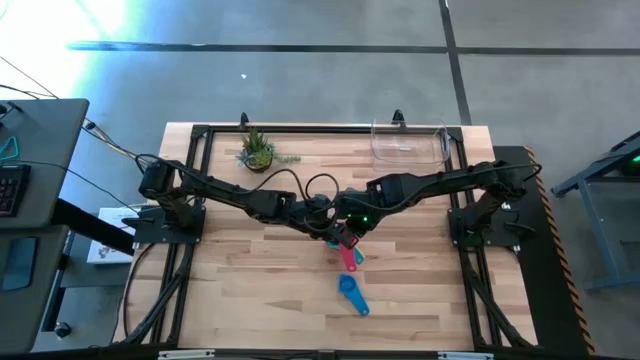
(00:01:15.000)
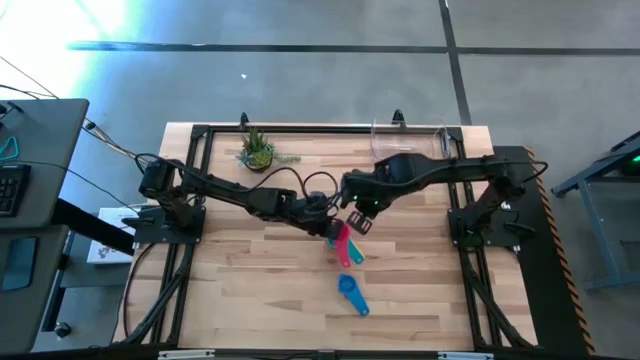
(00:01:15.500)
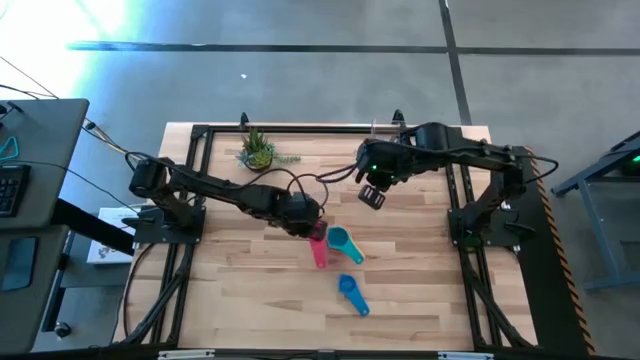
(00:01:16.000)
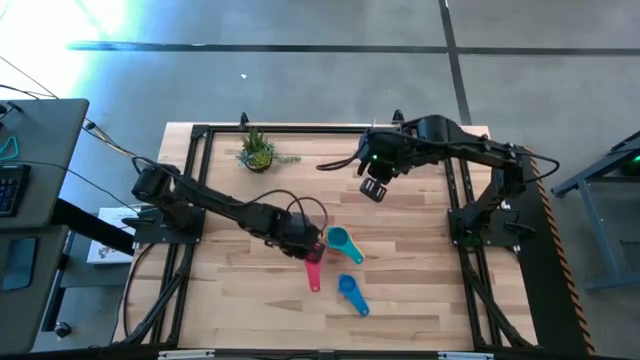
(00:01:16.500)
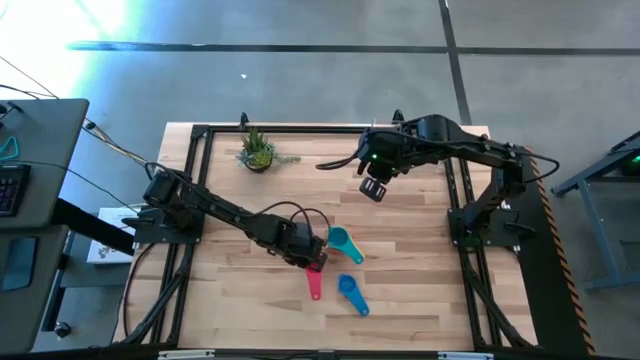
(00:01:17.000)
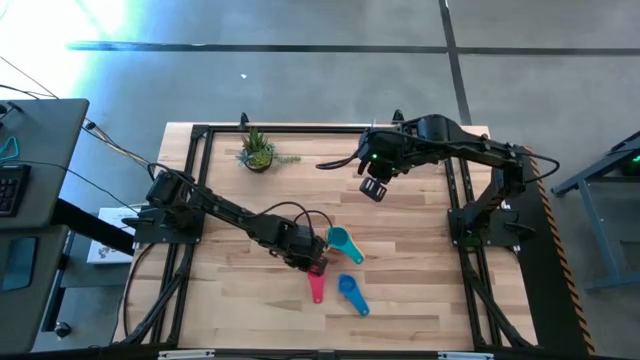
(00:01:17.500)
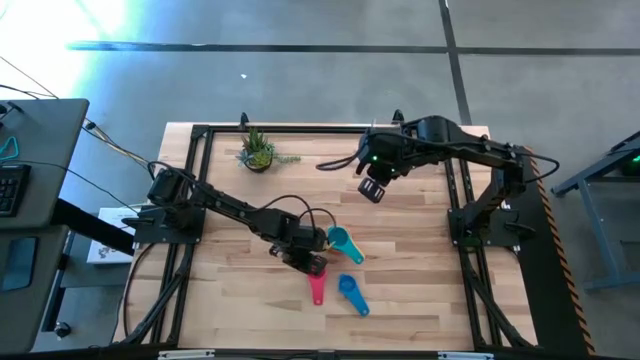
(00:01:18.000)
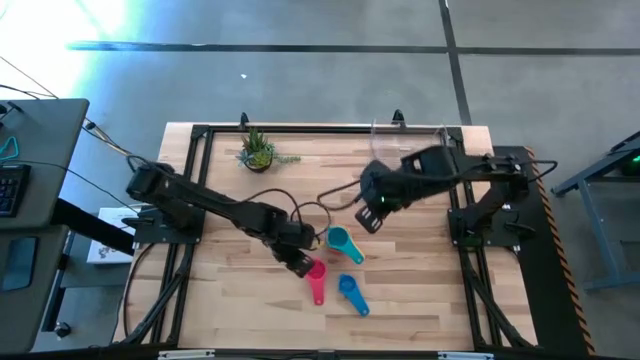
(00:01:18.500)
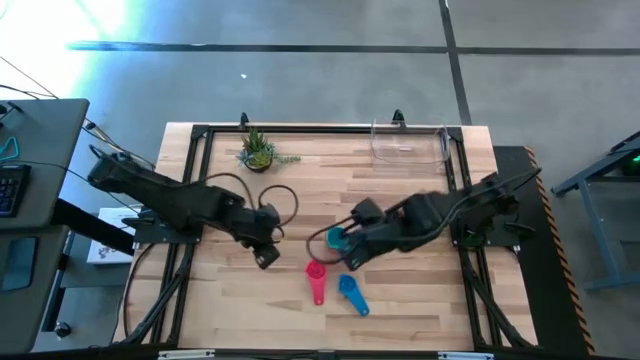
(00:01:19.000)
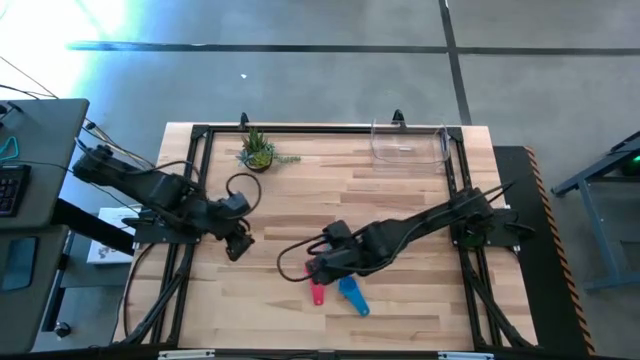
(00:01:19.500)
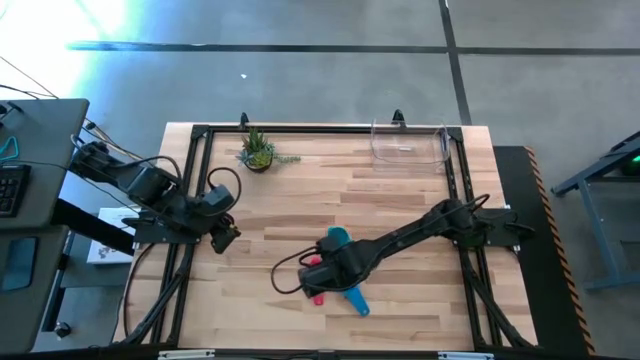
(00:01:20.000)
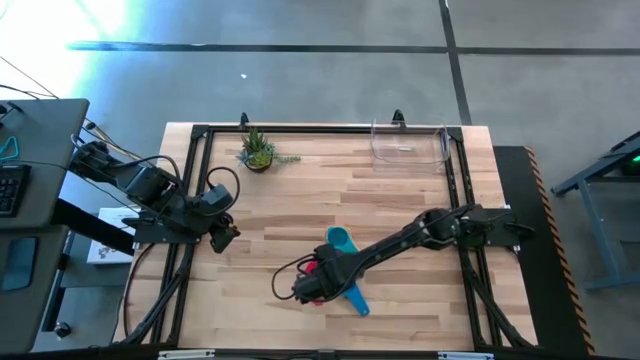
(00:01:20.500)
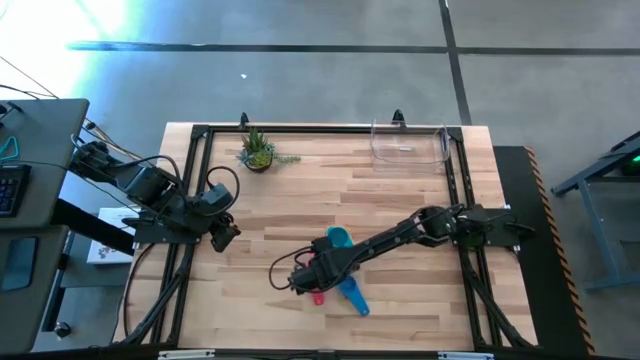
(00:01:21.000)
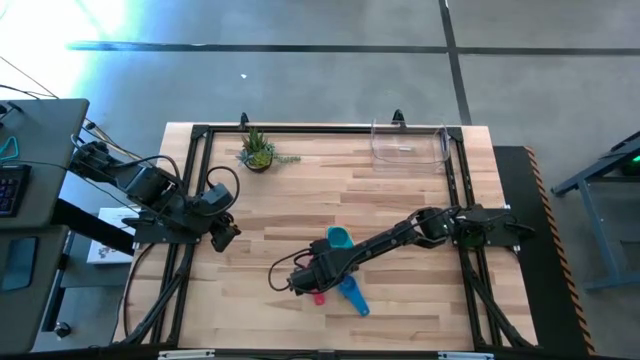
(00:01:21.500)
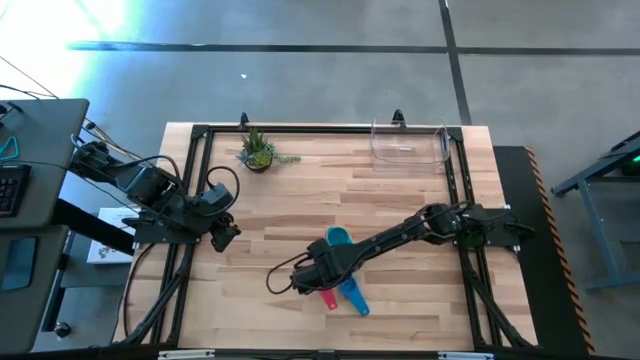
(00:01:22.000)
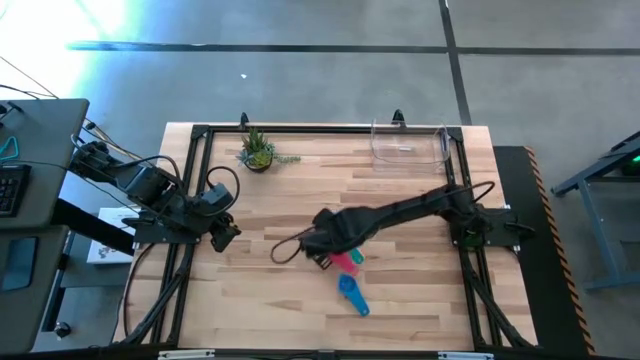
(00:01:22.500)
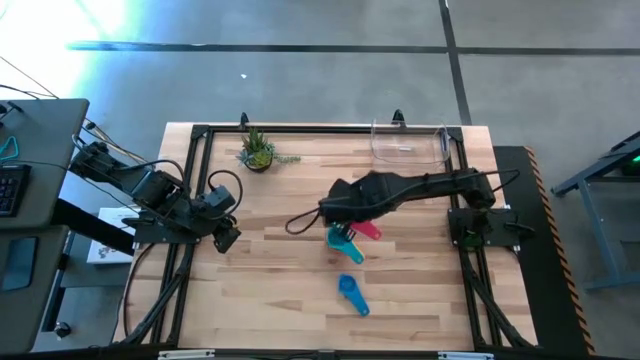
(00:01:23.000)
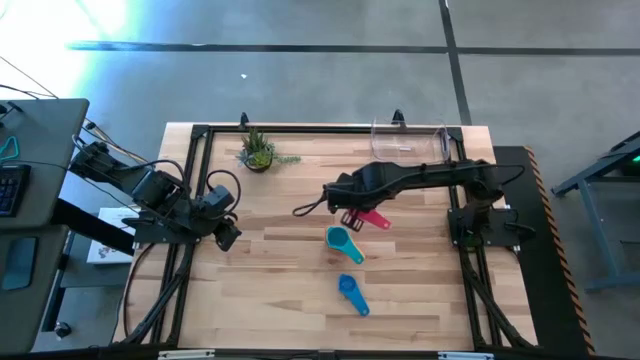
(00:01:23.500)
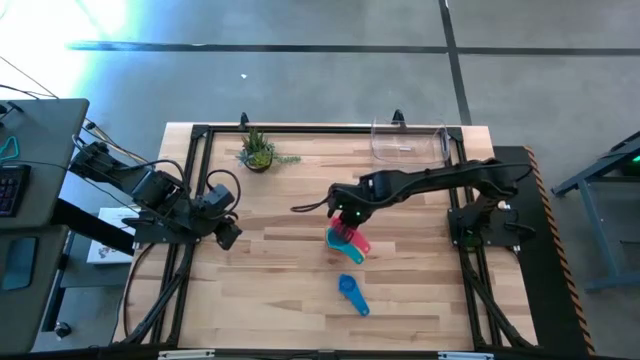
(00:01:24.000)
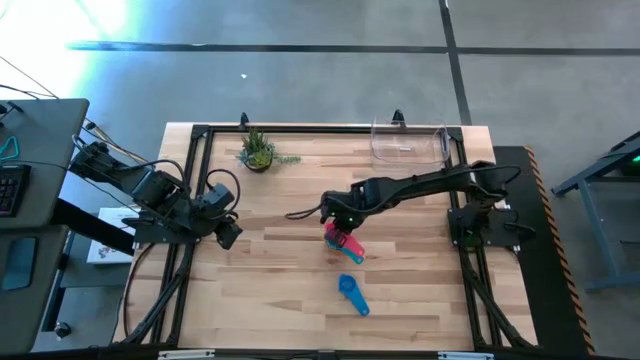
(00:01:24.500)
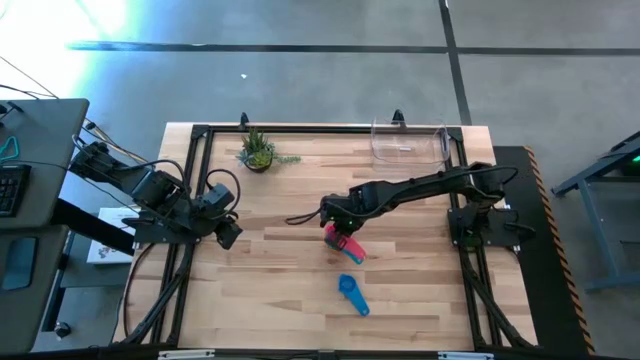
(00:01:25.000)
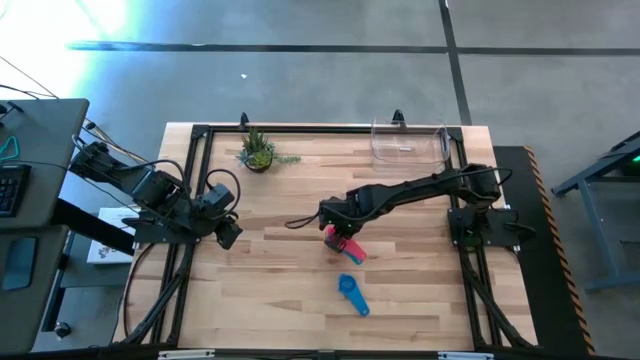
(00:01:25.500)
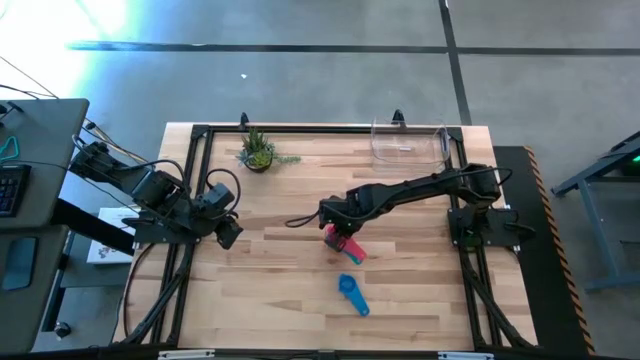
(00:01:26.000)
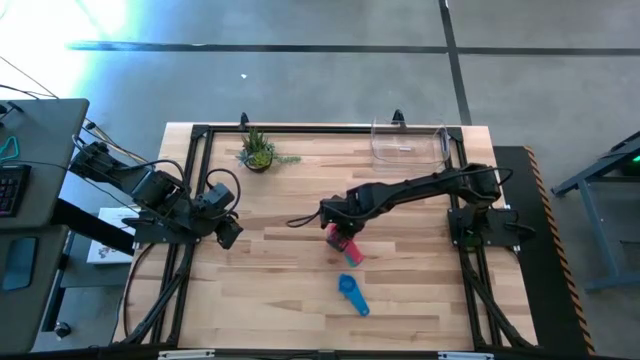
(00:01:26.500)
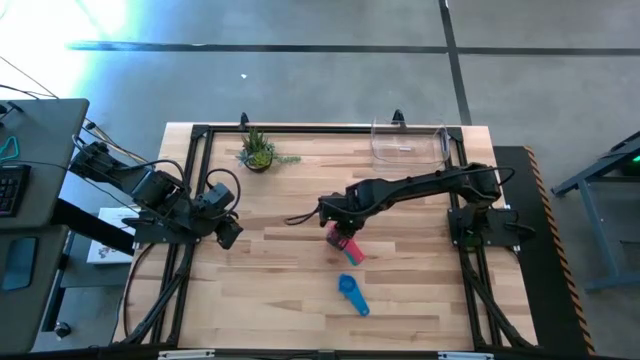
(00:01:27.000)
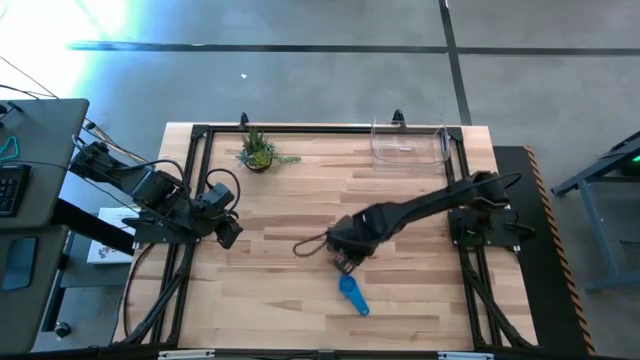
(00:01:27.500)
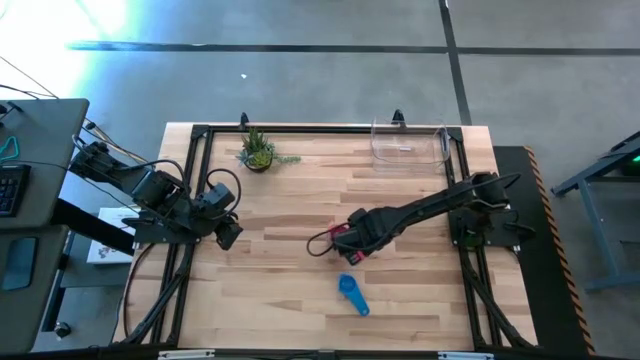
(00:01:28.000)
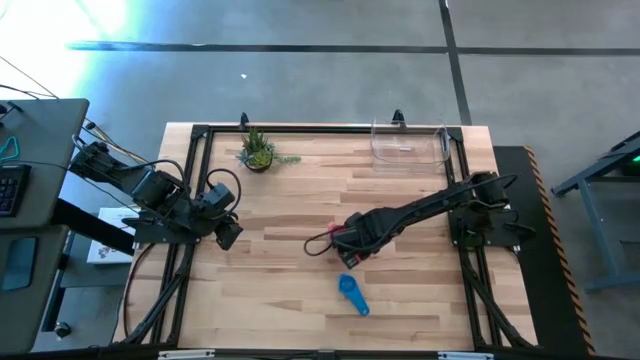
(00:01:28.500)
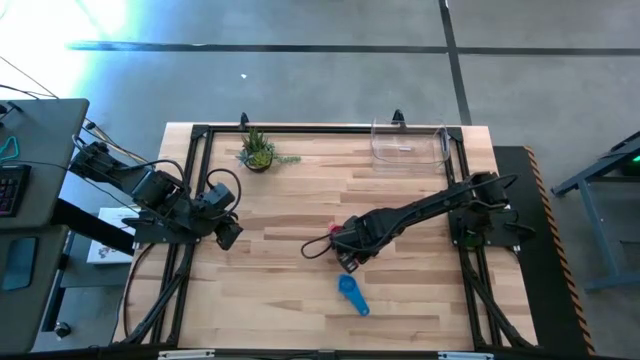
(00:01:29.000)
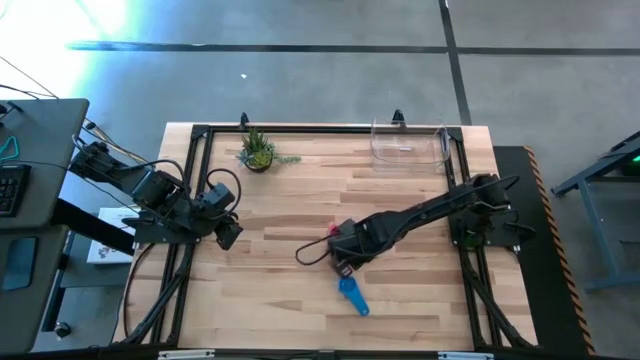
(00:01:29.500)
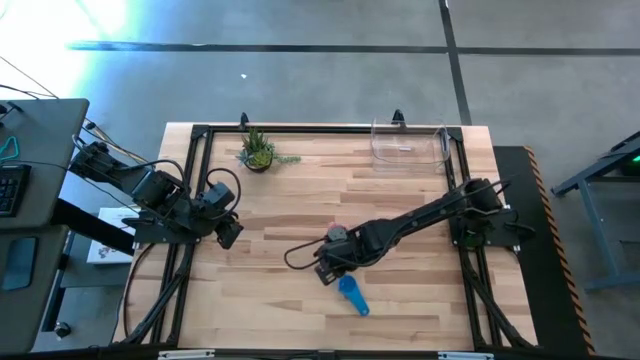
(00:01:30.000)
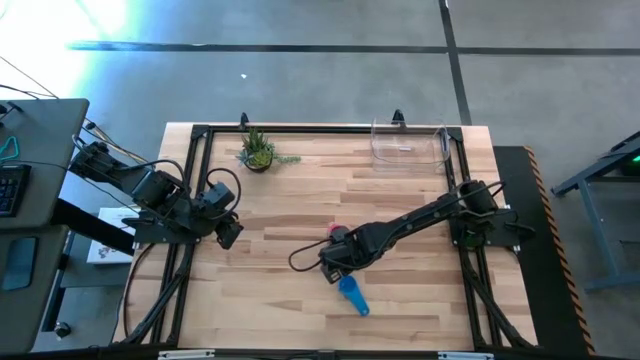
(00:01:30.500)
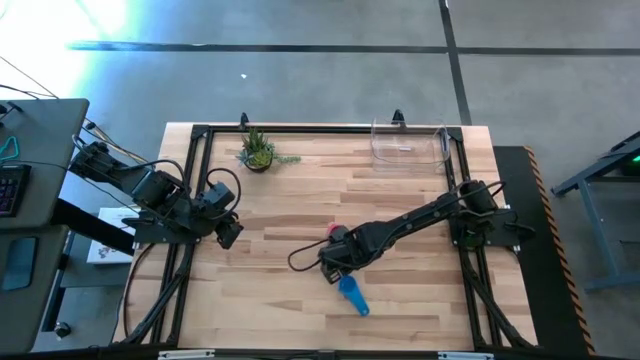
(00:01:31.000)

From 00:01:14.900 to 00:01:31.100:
Task: Nest measuring cups in basket
Stack the red measuring cup on top of the light blue measuring cup

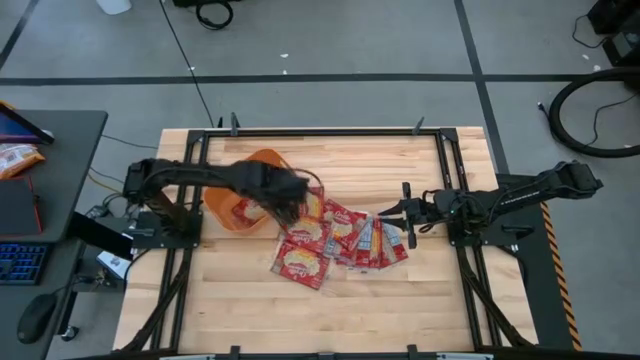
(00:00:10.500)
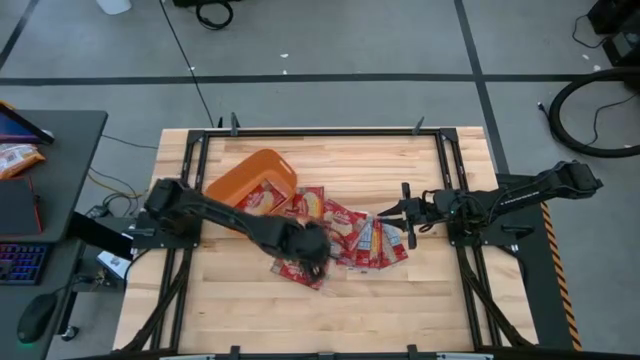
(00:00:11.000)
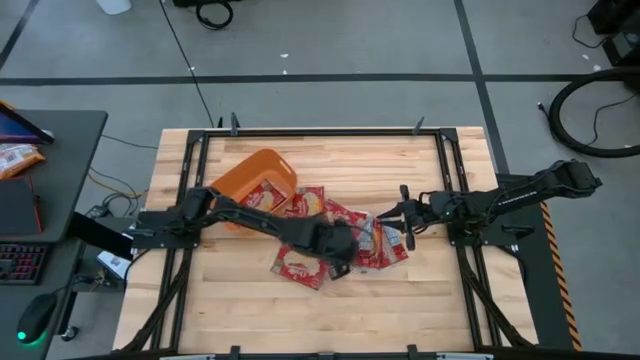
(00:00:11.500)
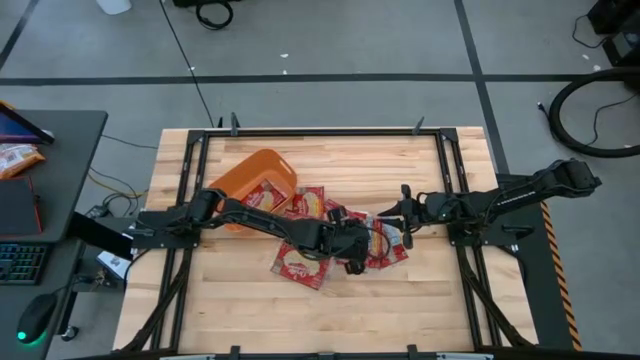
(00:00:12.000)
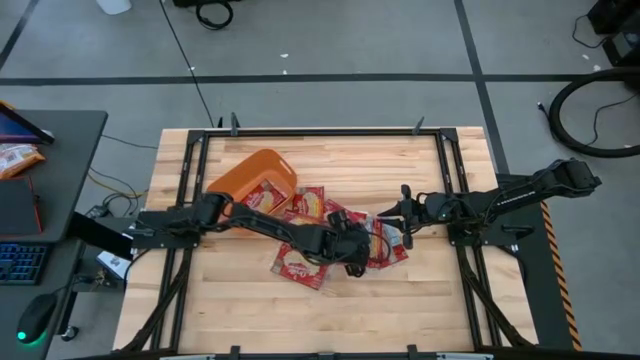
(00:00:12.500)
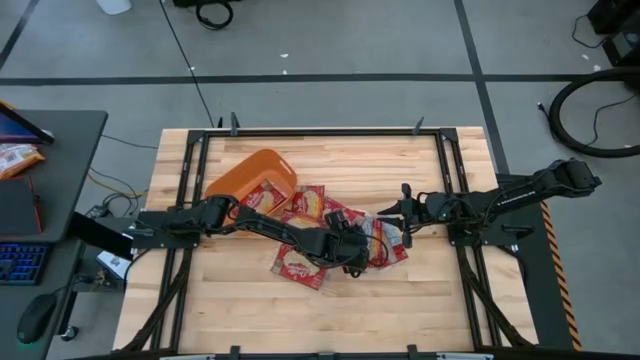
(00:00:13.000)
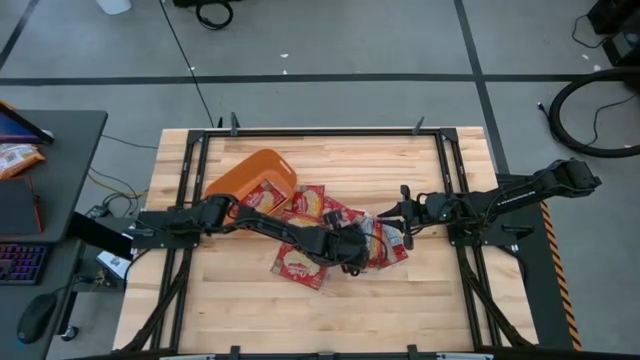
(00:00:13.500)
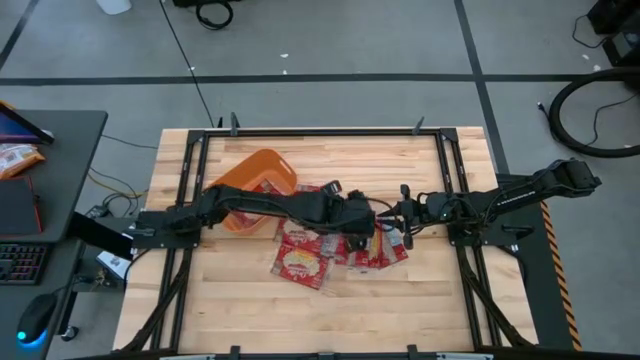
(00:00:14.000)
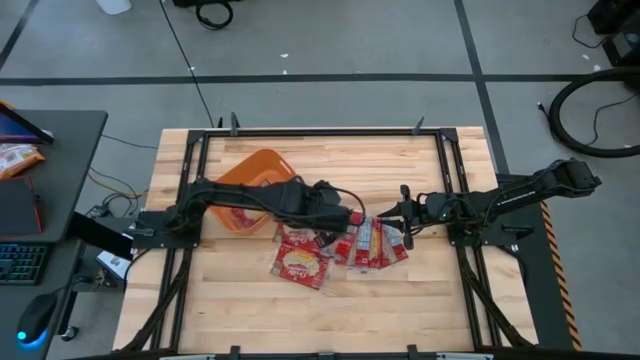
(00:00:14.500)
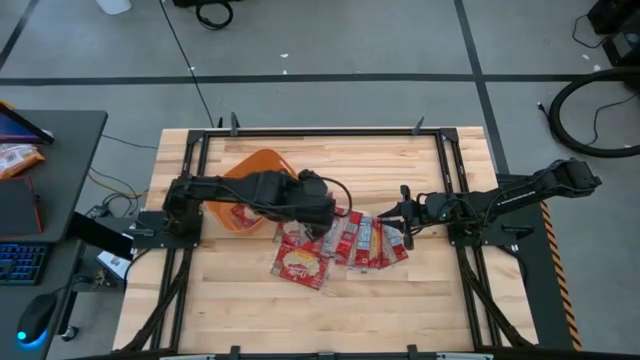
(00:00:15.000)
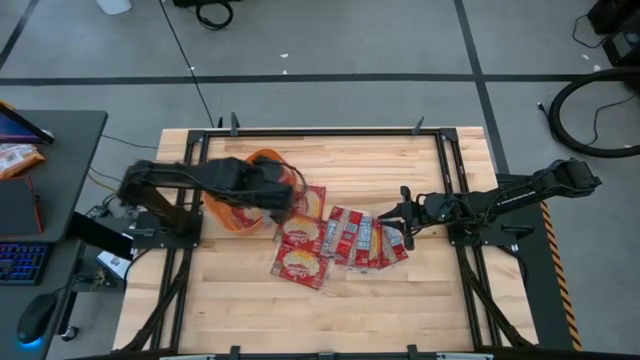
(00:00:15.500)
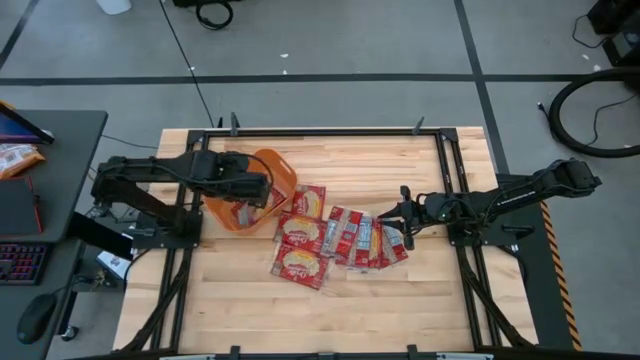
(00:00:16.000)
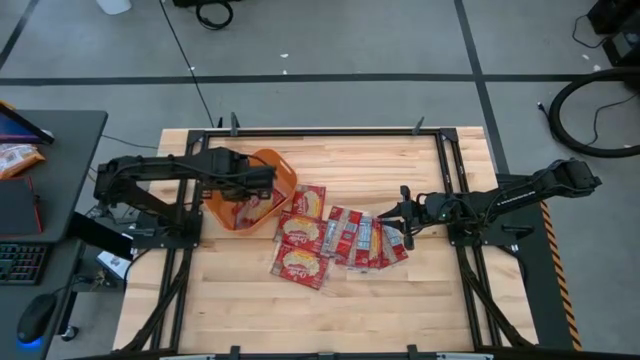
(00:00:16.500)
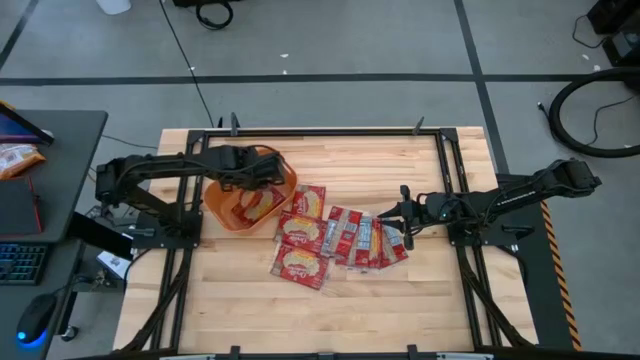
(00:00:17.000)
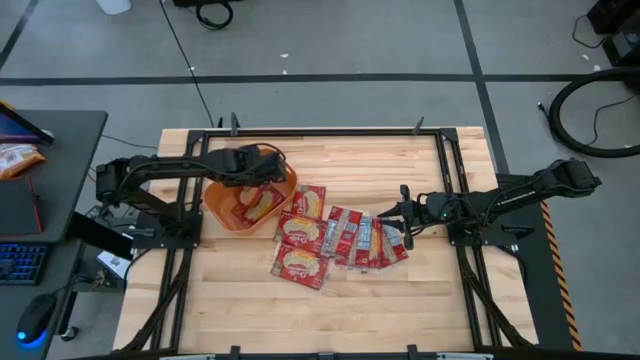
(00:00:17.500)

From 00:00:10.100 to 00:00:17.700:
Task: Sort popcorn bags into baskets
Put the red popcorn bag into the orange bin
